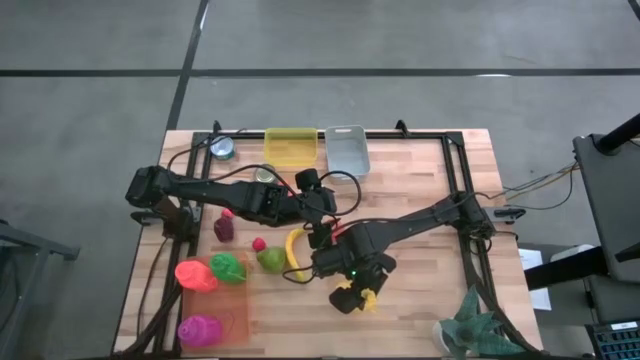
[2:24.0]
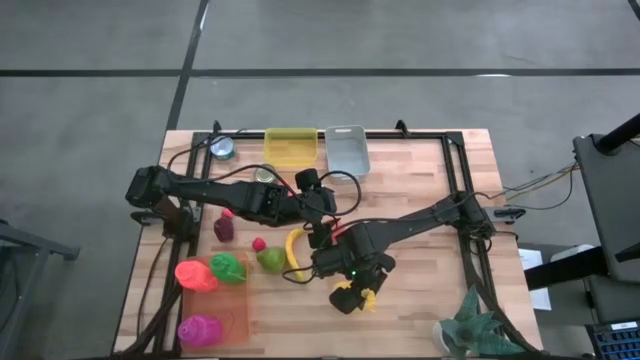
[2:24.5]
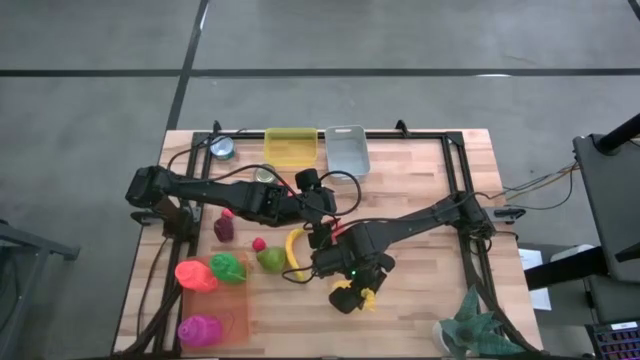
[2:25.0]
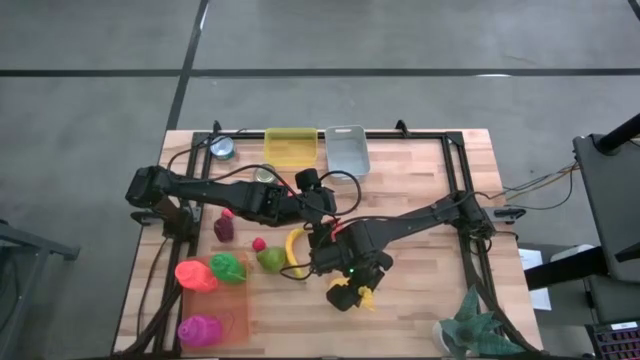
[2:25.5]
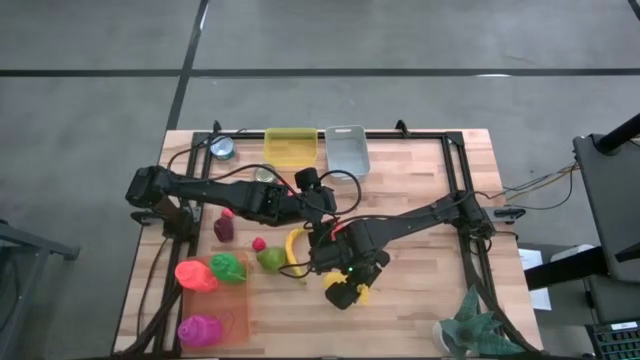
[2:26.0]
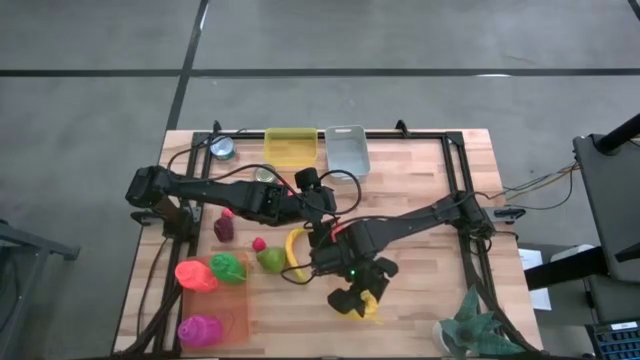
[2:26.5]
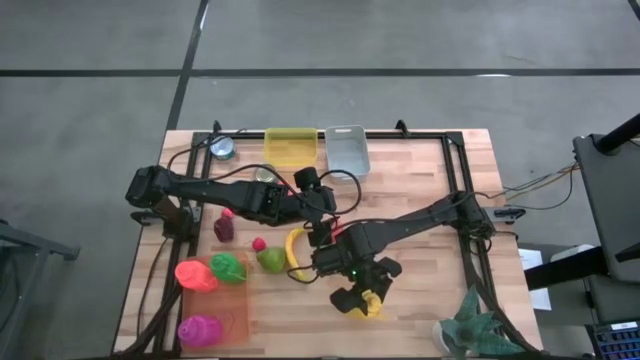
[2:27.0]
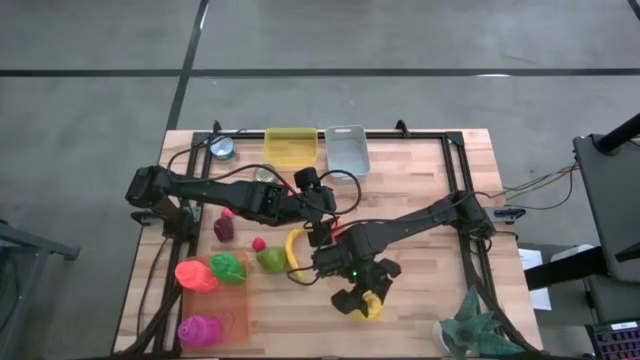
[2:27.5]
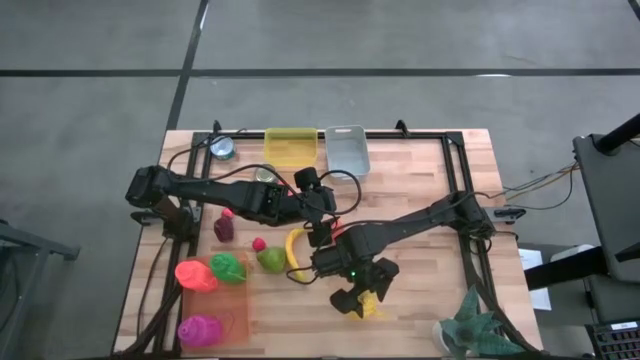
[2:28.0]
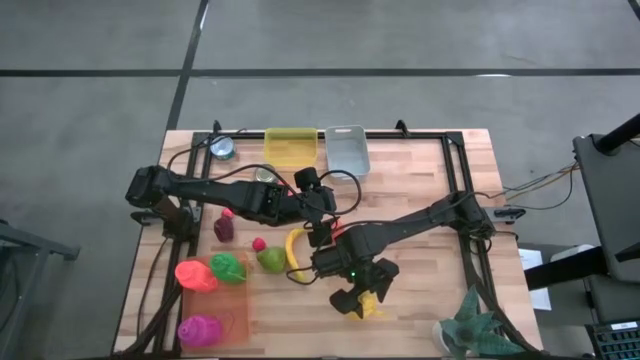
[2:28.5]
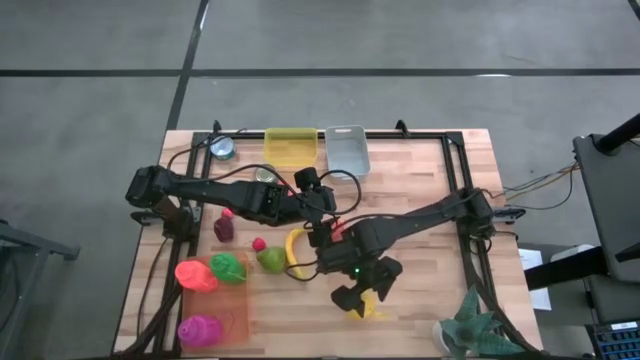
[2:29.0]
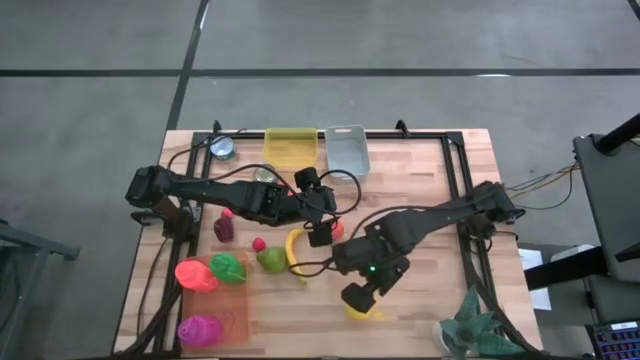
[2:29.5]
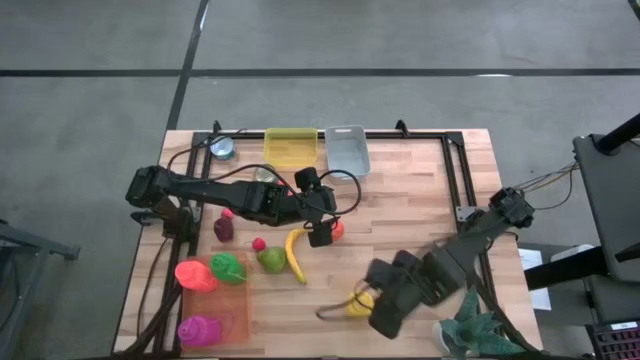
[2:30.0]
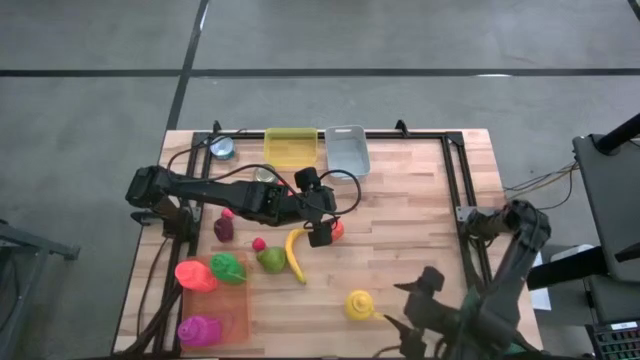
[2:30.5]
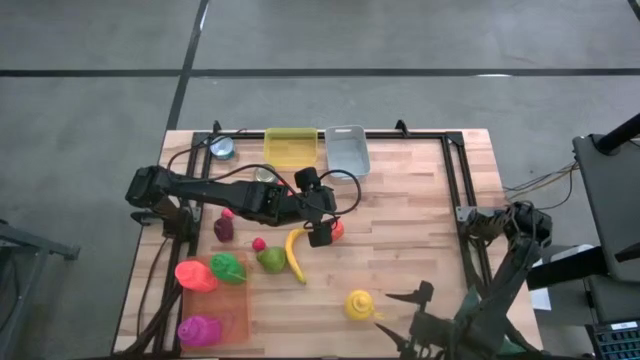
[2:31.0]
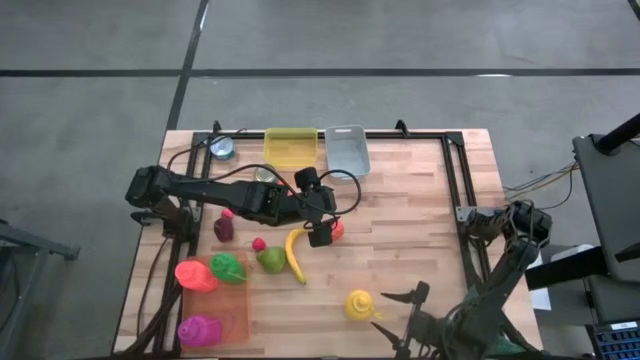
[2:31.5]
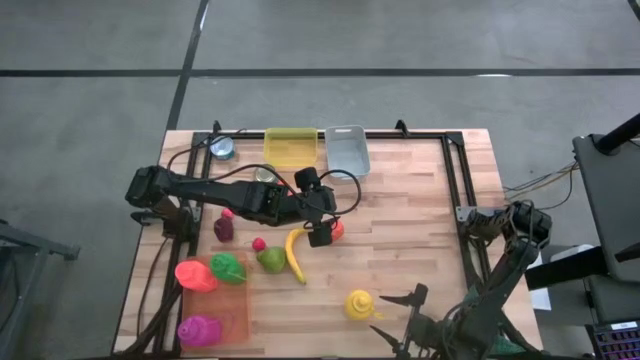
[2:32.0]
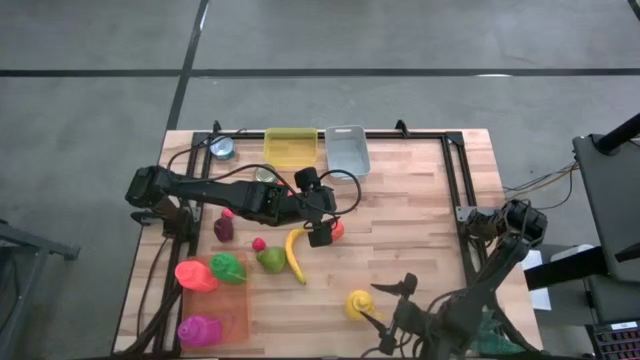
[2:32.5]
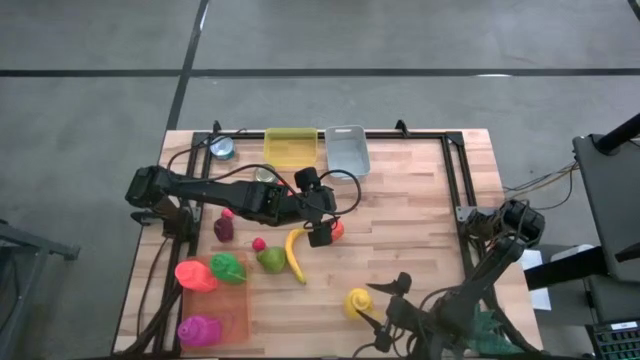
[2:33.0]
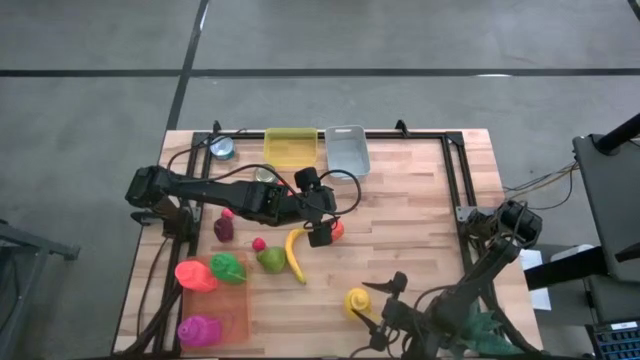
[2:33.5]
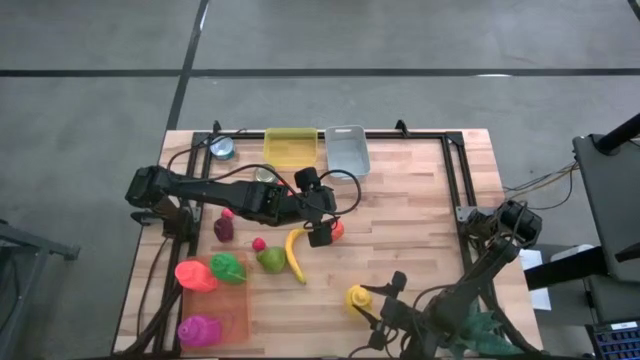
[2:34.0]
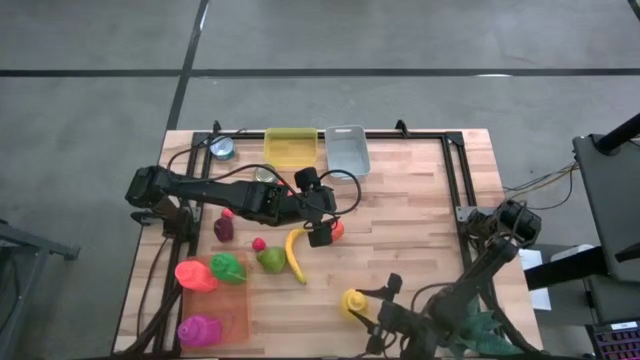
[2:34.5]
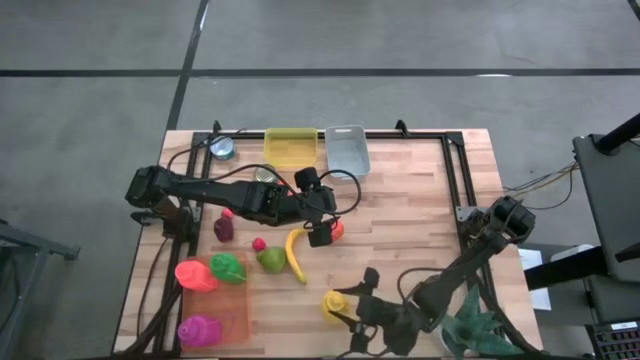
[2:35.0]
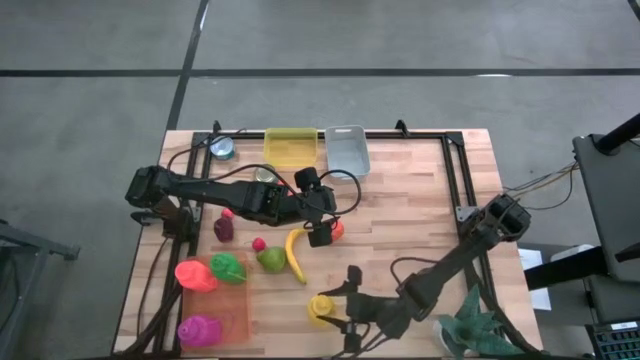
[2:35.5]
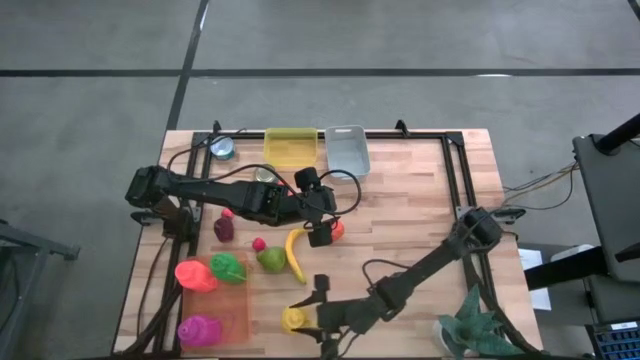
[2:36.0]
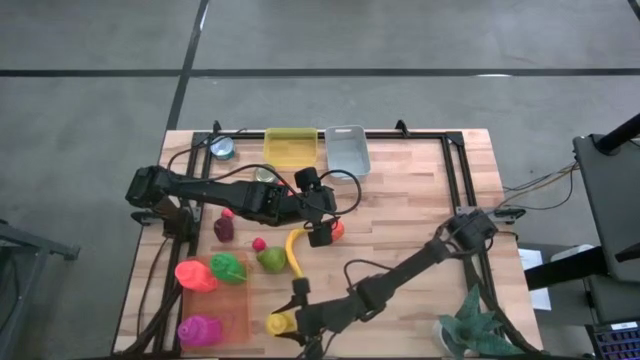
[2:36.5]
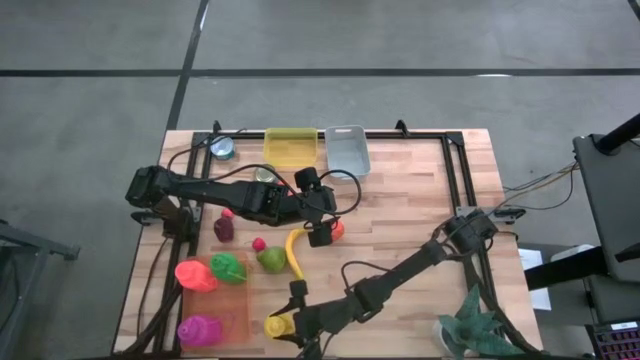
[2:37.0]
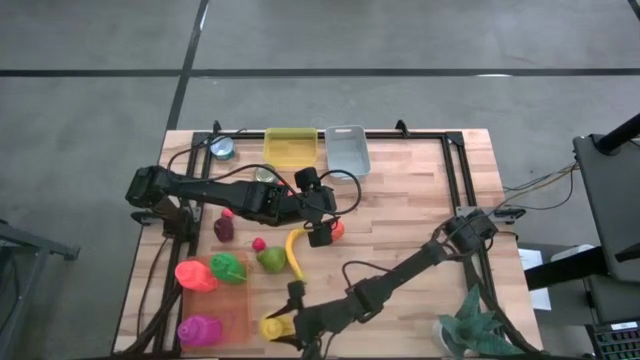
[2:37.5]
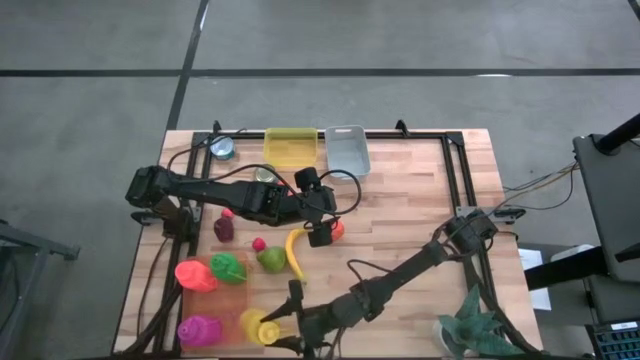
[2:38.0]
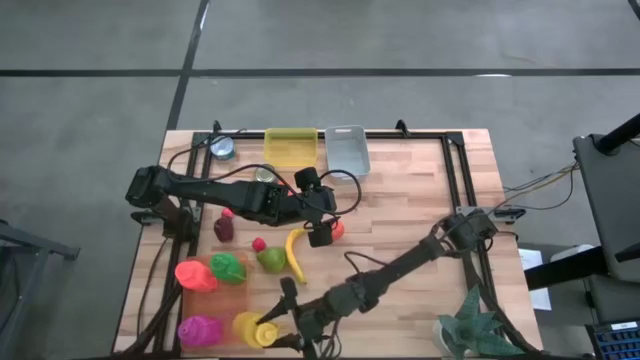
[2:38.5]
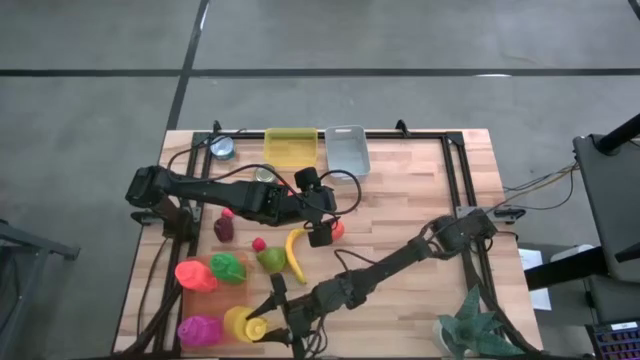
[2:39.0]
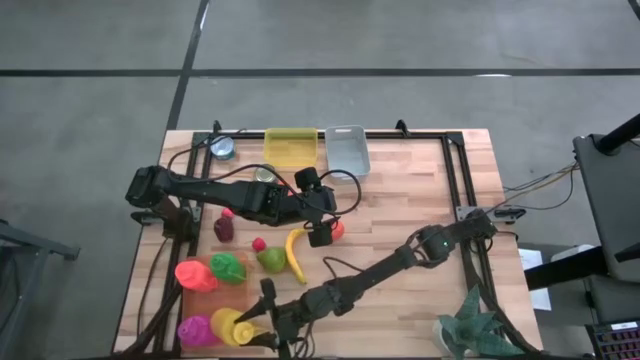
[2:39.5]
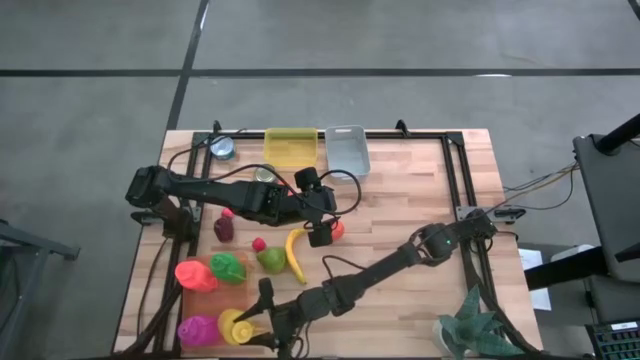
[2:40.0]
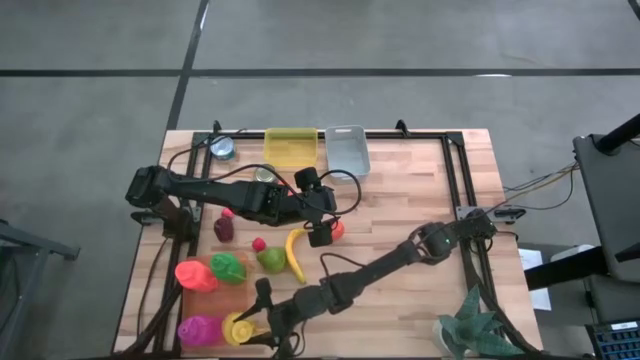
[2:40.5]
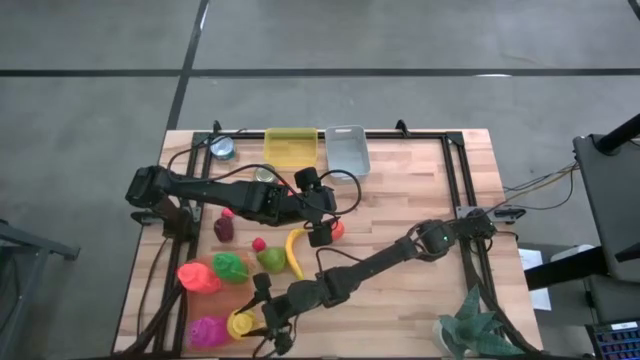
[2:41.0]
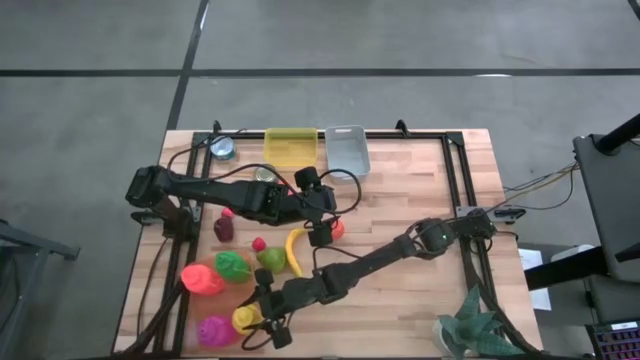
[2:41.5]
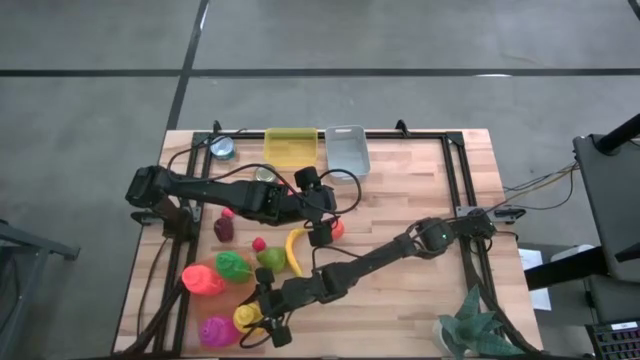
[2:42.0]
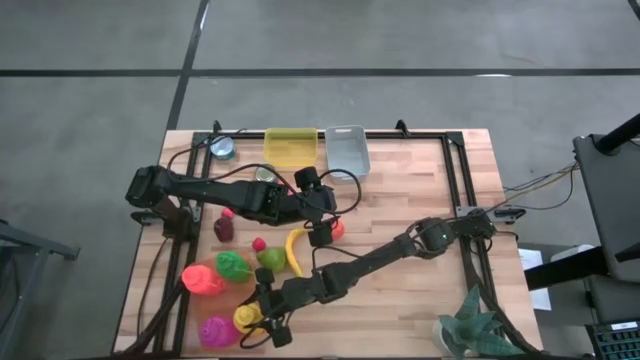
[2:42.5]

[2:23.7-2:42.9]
Task: Pick & Place Food Item
Put the yellow tumbler into the orange bin
